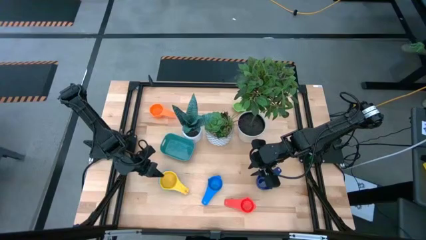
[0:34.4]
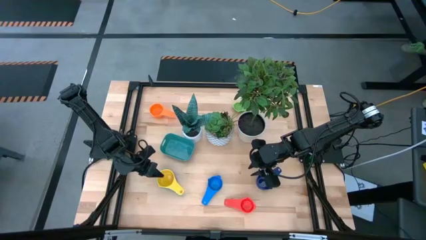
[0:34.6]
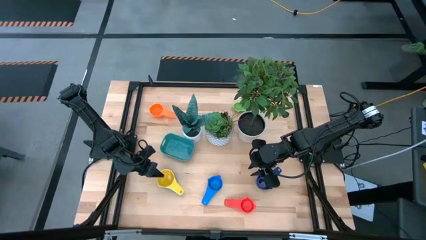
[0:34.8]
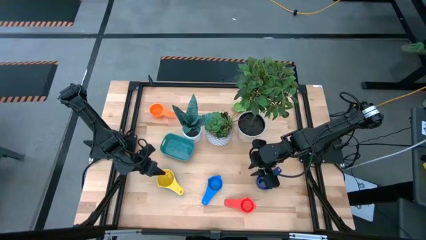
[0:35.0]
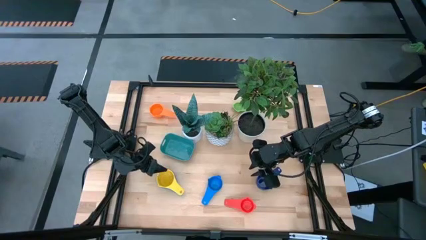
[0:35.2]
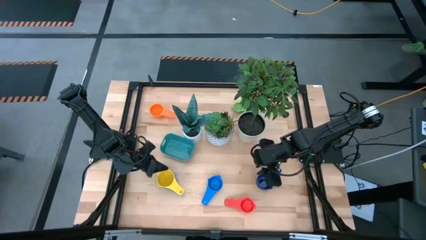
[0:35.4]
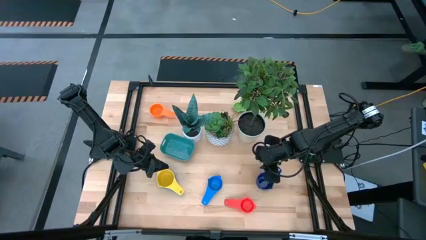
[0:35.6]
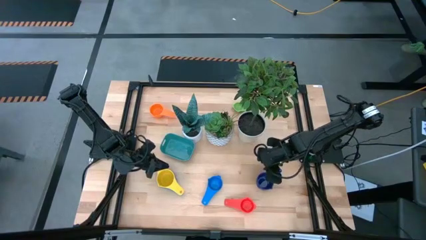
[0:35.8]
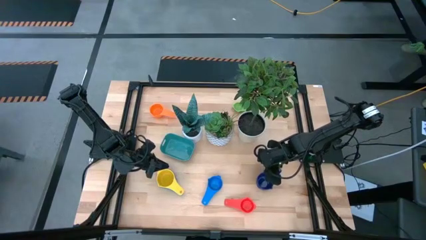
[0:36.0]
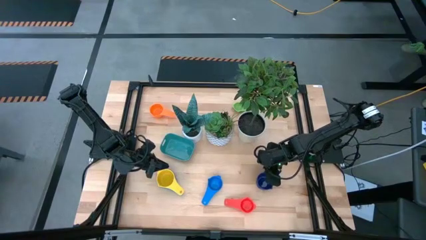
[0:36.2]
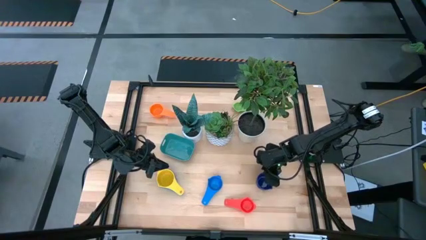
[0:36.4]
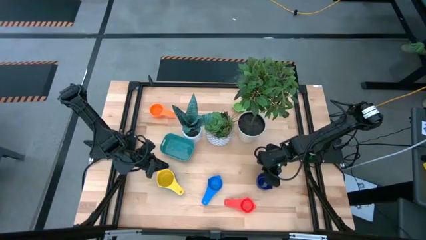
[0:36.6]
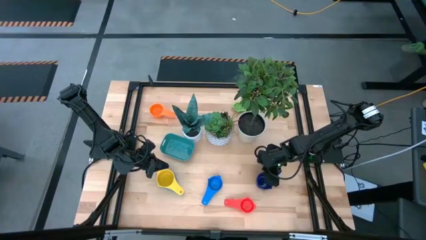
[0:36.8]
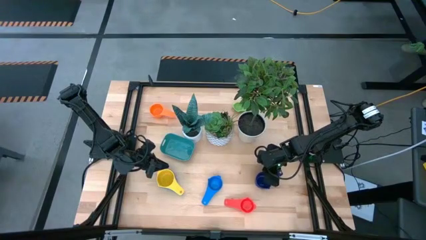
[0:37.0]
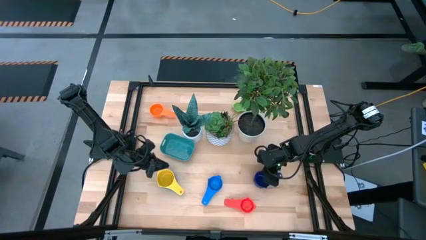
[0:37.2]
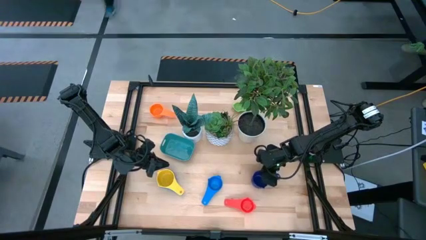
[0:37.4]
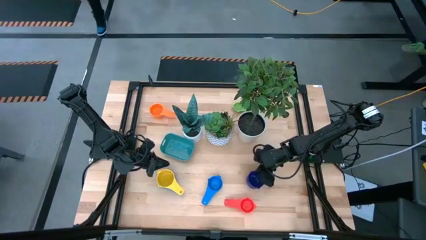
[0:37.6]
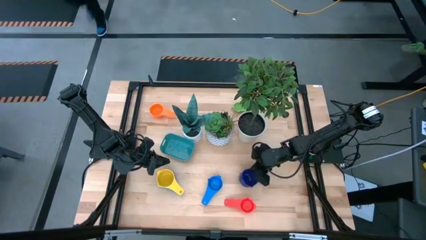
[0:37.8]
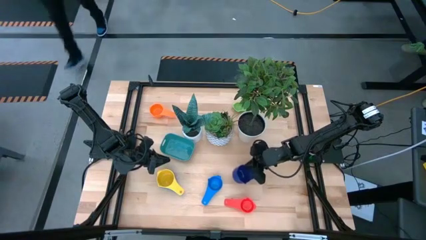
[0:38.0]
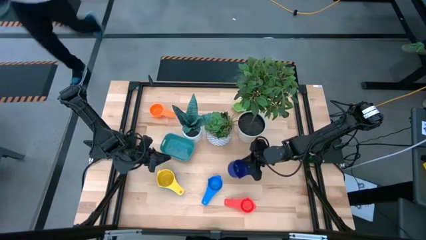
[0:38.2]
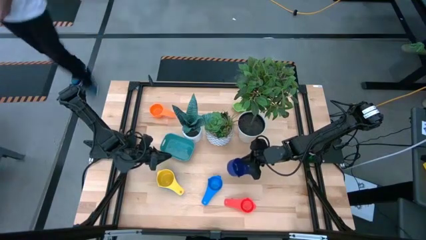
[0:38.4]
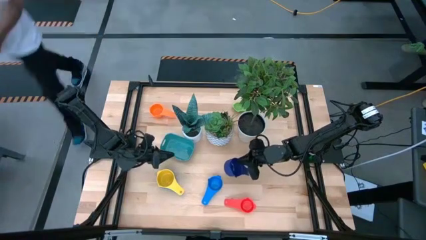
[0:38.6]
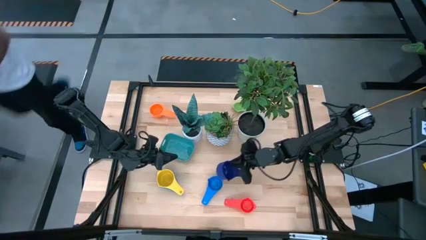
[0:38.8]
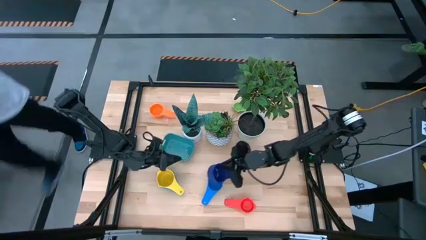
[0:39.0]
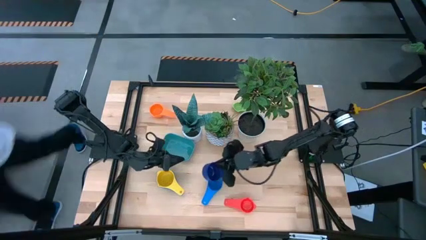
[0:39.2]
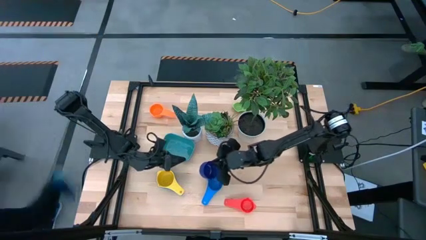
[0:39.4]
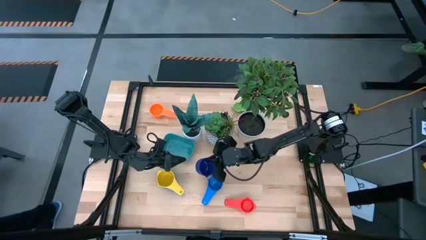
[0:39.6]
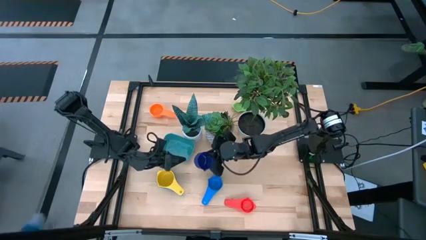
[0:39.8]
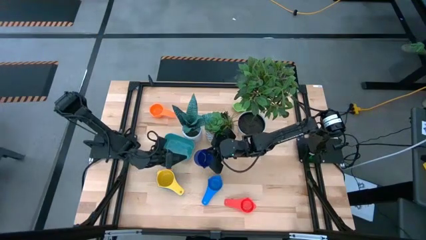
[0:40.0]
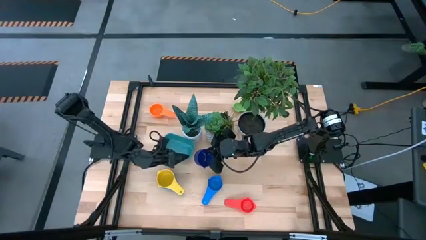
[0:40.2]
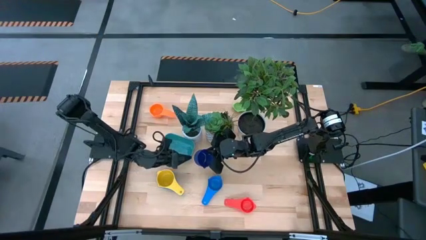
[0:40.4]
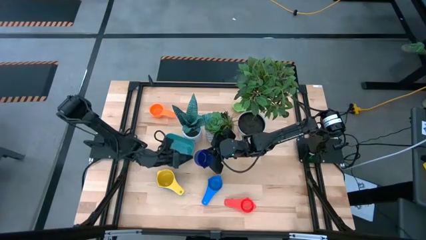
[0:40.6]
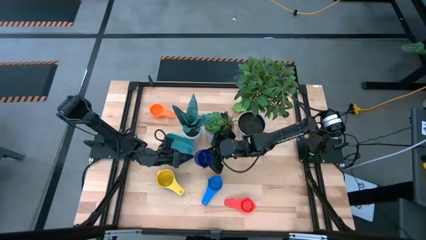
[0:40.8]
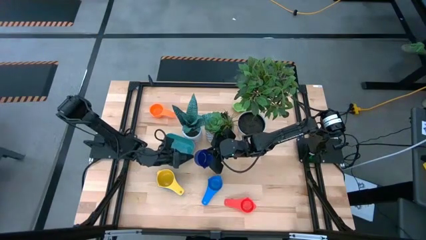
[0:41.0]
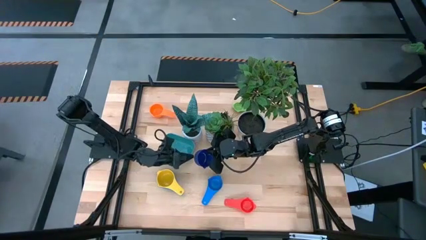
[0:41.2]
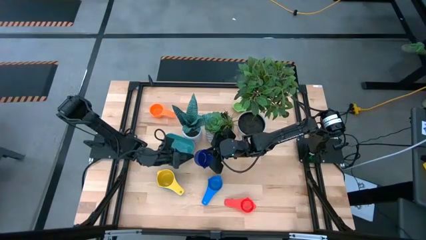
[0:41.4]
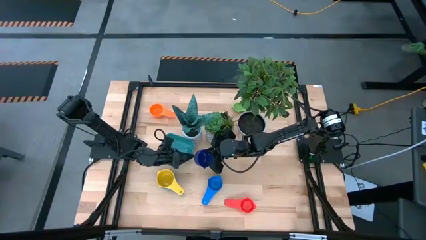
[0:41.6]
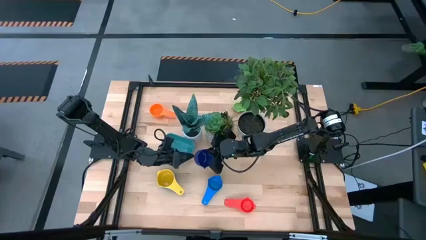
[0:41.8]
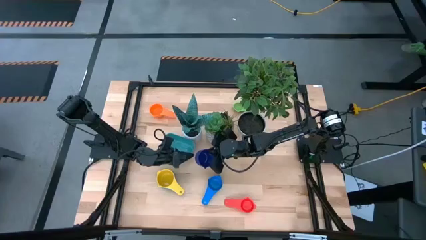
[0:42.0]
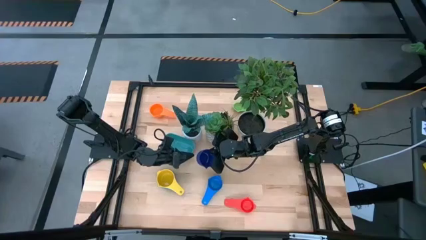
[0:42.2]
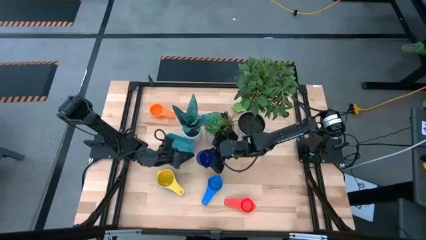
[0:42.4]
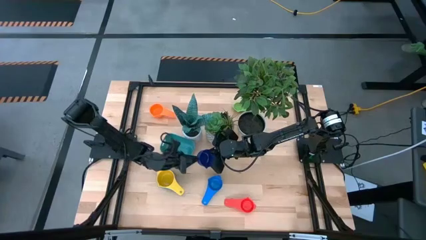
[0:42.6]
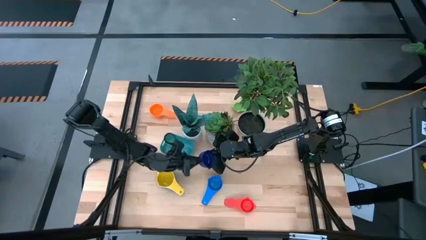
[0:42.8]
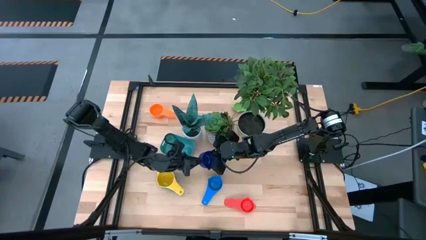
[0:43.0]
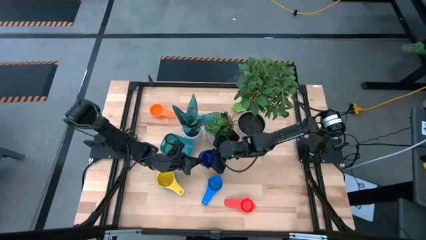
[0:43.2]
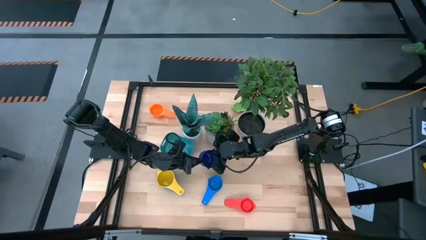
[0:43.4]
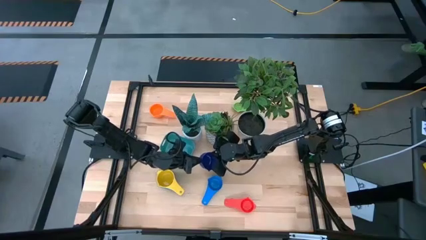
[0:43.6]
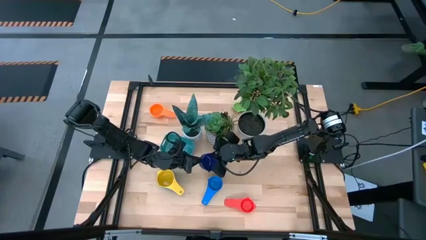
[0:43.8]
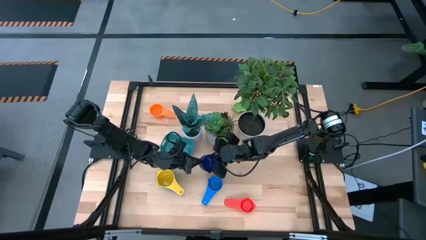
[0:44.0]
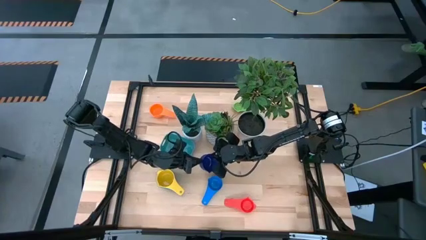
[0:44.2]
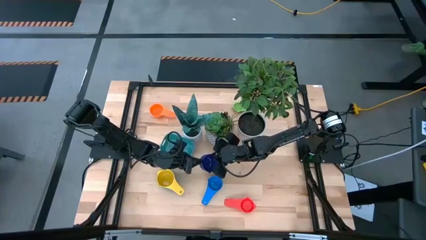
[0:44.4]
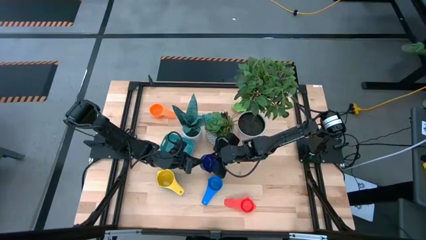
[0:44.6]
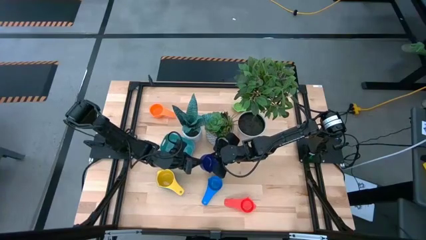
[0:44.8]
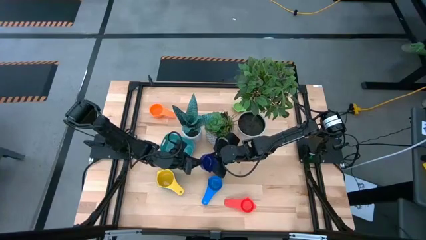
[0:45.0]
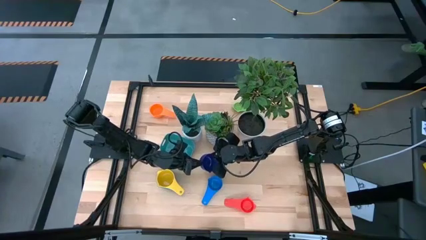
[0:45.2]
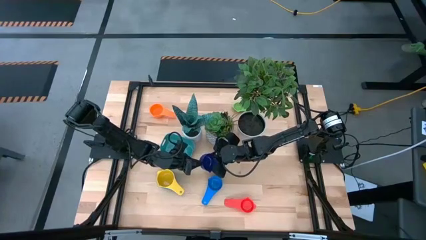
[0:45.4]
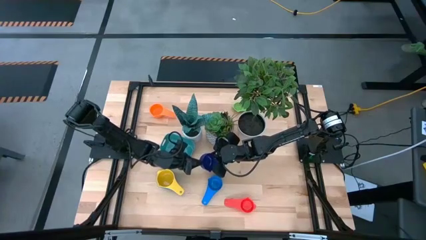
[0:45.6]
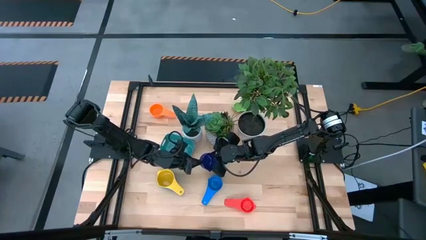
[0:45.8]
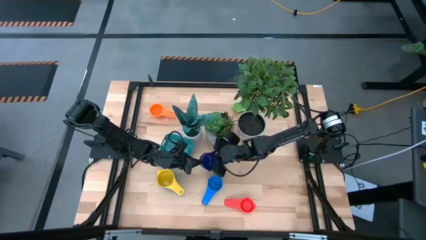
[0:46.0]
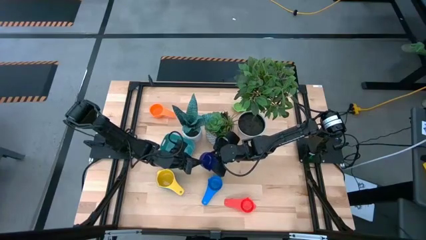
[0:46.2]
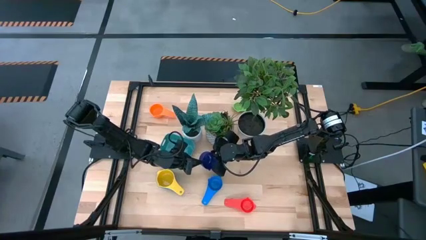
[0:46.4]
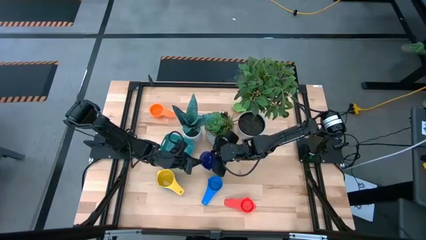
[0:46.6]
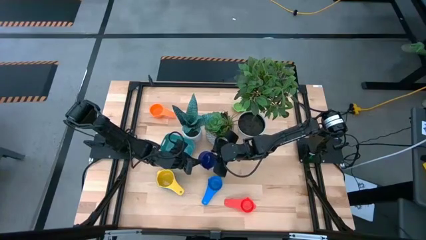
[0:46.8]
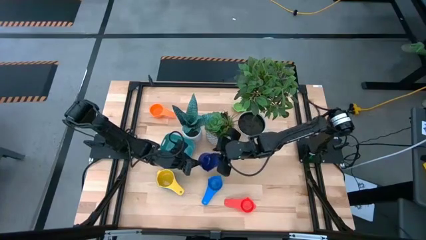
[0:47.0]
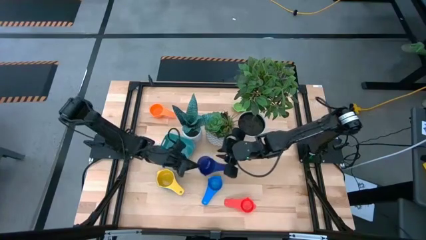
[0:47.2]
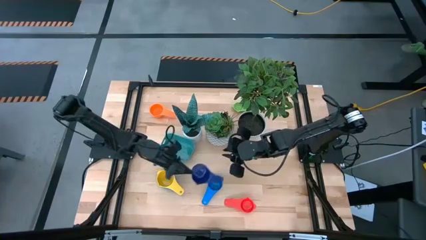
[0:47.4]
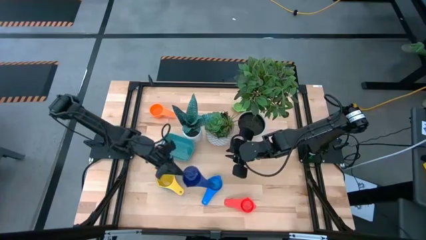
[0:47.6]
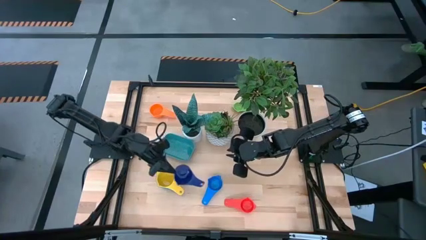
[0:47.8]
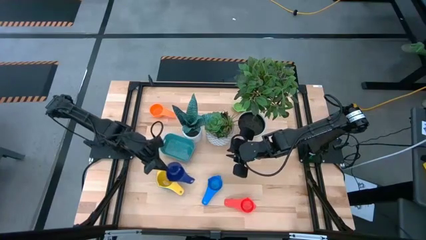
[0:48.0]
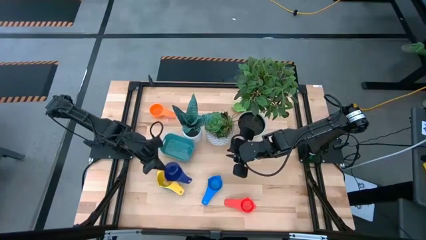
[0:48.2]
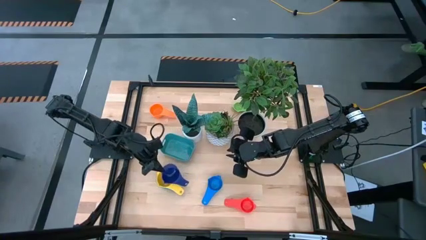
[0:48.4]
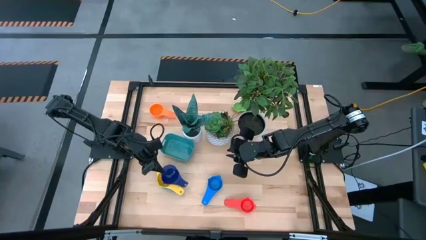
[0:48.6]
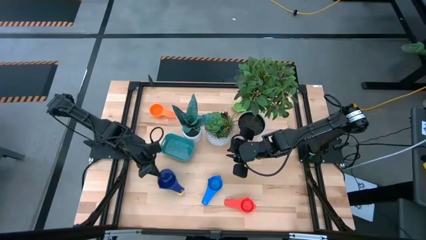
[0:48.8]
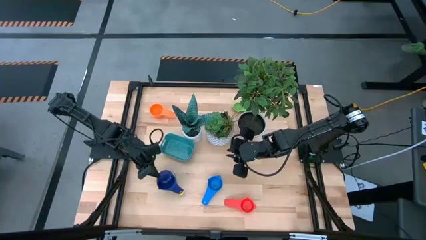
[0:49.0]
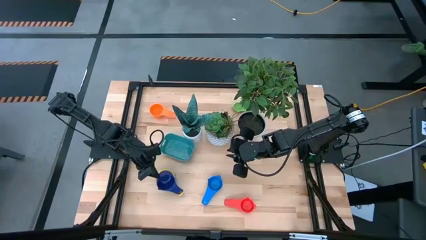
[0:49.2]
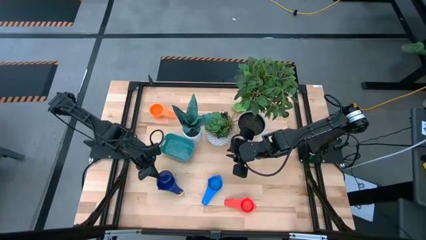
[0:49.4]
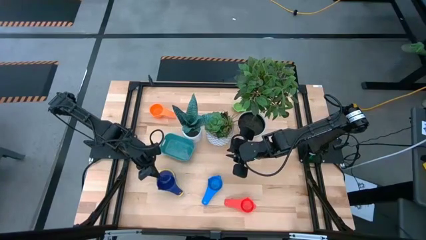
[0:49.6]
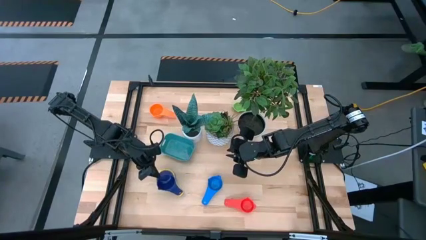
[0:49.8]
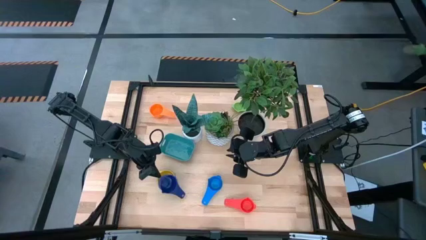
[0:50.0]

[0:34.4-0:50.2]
Task: Nest measuring cups in basket
Stack the violet measuring cup into the yellow measuring cup
